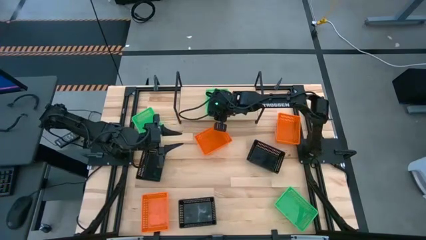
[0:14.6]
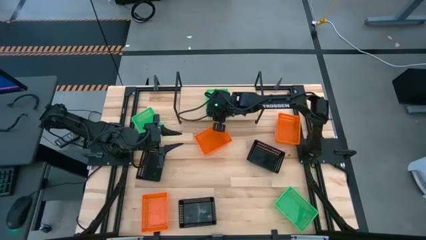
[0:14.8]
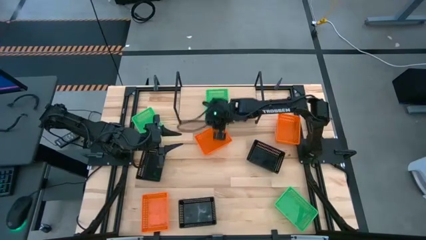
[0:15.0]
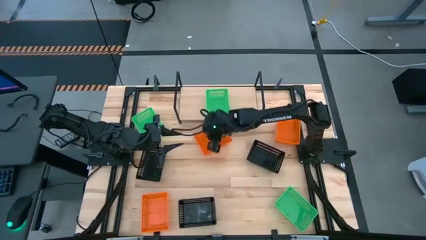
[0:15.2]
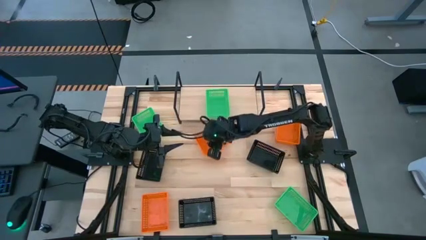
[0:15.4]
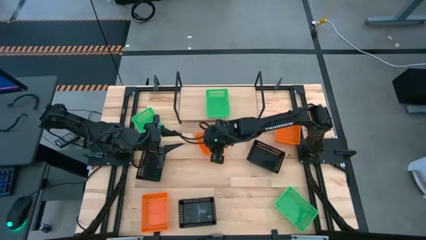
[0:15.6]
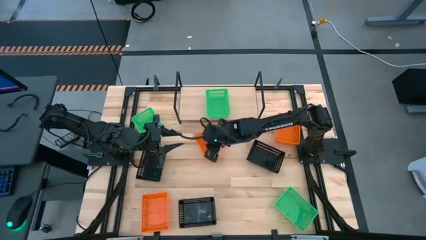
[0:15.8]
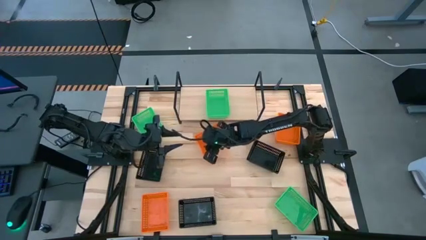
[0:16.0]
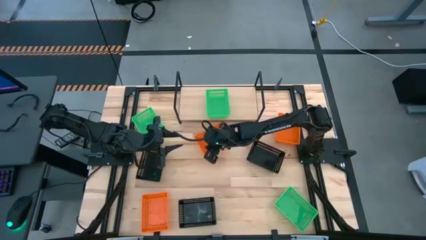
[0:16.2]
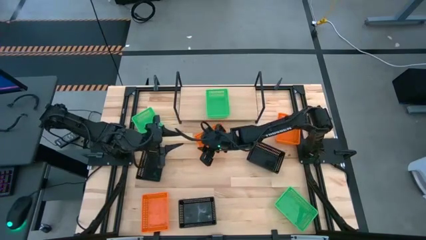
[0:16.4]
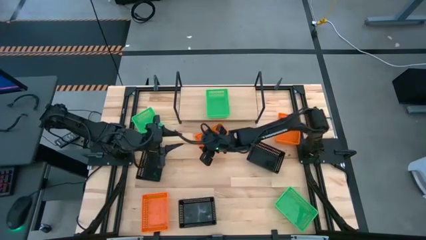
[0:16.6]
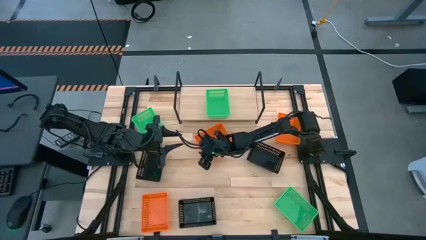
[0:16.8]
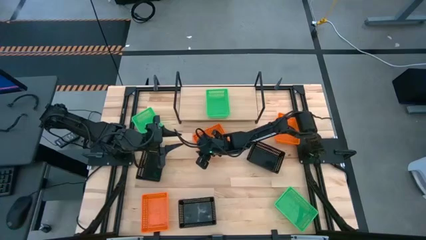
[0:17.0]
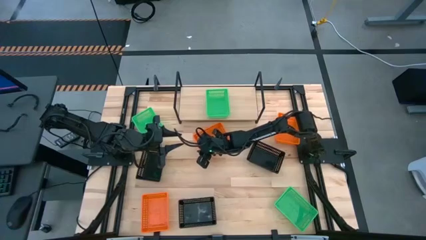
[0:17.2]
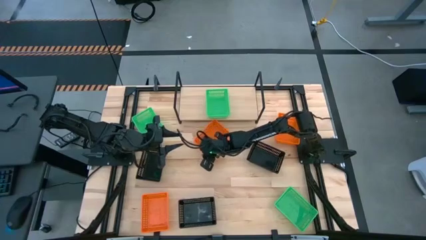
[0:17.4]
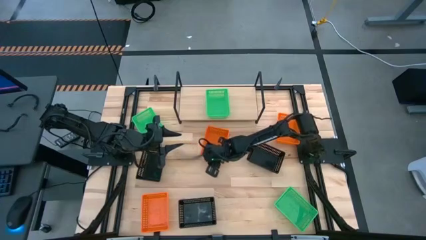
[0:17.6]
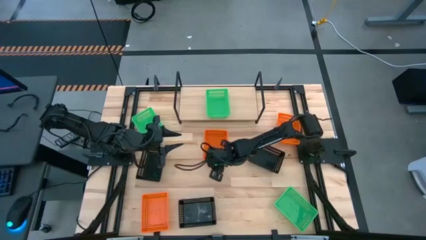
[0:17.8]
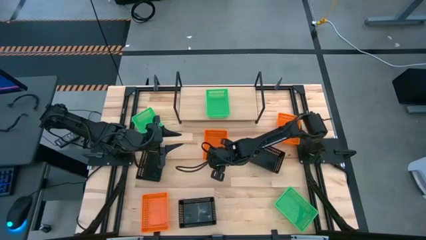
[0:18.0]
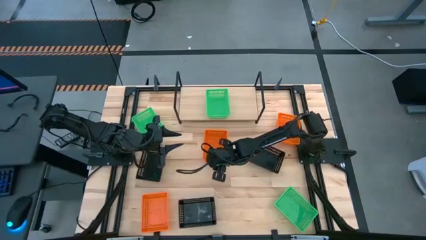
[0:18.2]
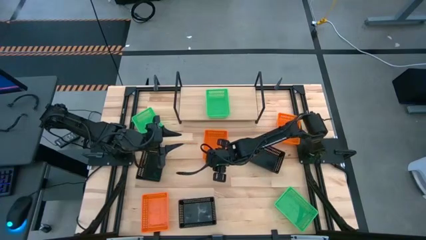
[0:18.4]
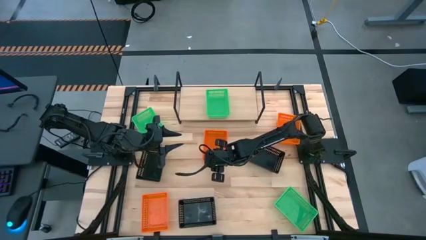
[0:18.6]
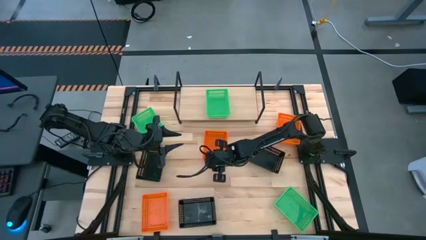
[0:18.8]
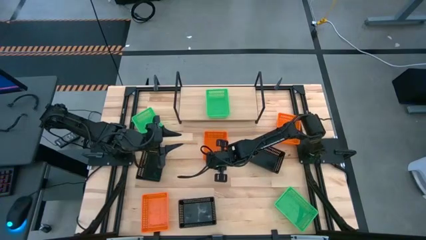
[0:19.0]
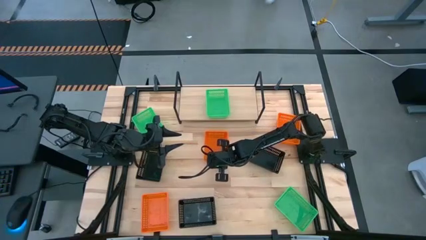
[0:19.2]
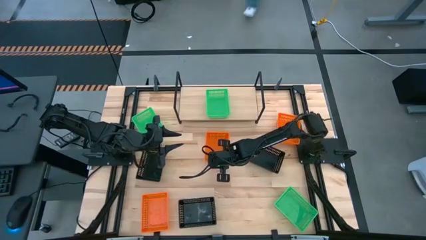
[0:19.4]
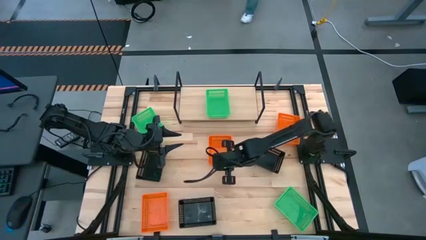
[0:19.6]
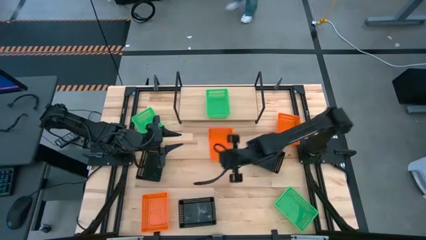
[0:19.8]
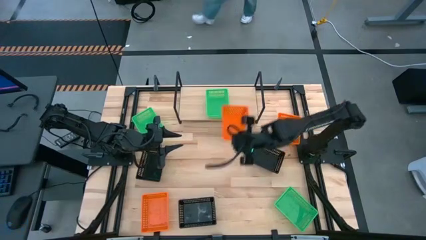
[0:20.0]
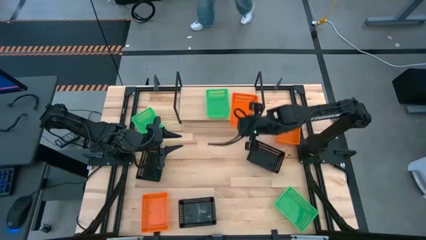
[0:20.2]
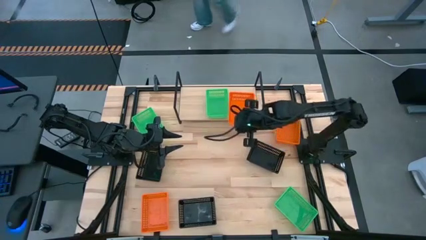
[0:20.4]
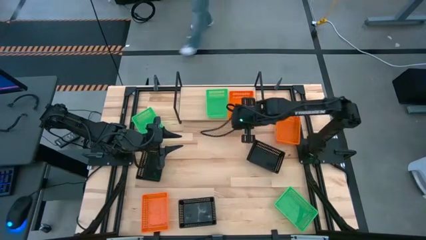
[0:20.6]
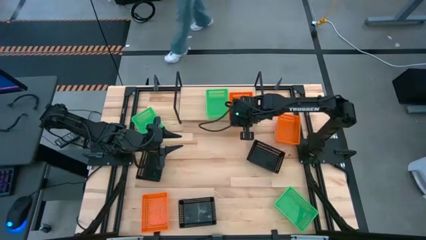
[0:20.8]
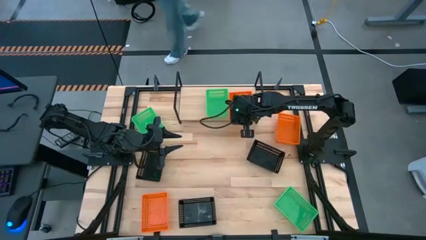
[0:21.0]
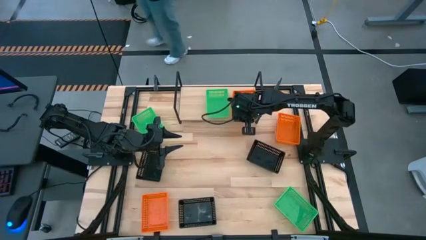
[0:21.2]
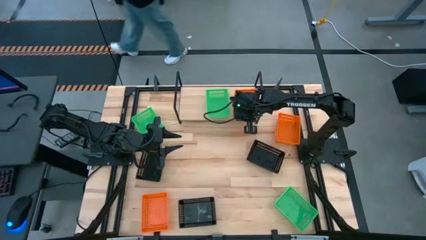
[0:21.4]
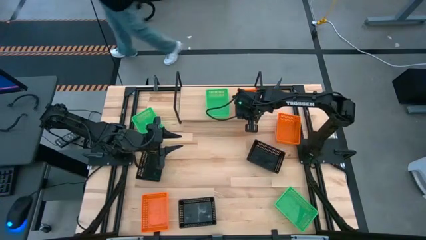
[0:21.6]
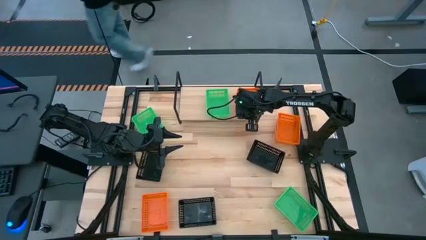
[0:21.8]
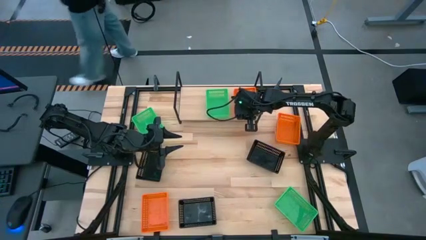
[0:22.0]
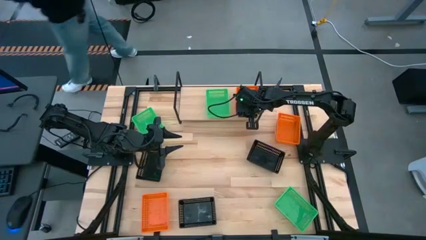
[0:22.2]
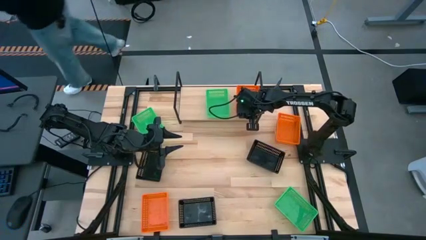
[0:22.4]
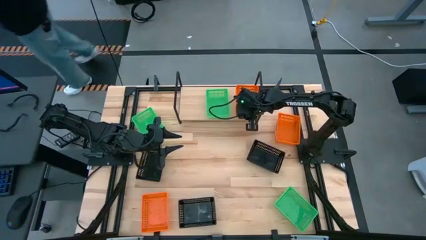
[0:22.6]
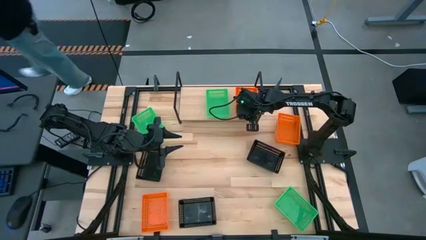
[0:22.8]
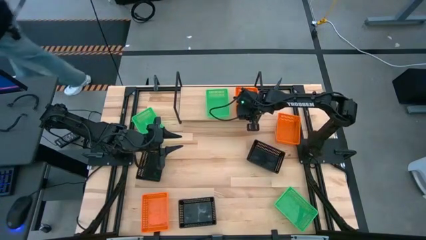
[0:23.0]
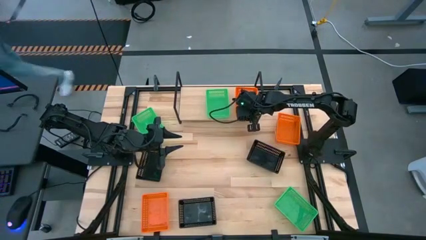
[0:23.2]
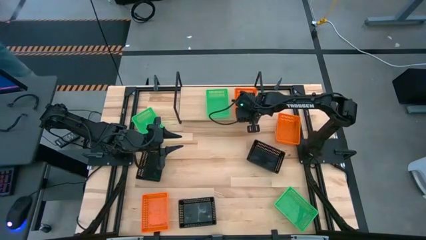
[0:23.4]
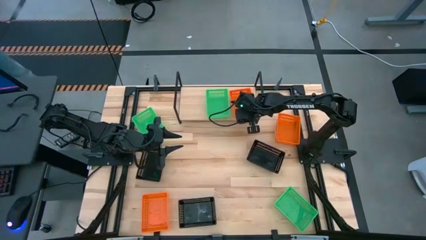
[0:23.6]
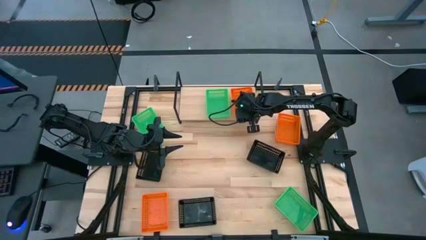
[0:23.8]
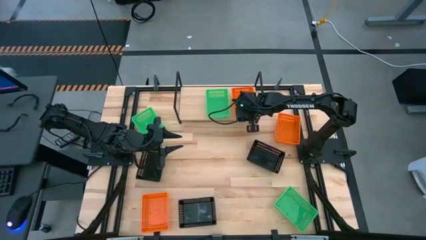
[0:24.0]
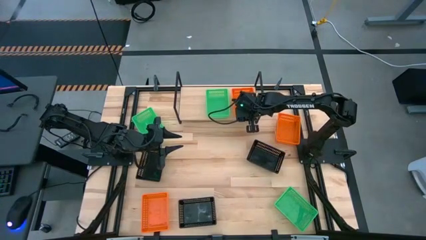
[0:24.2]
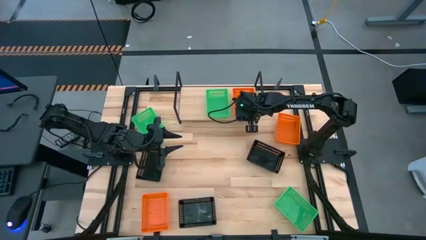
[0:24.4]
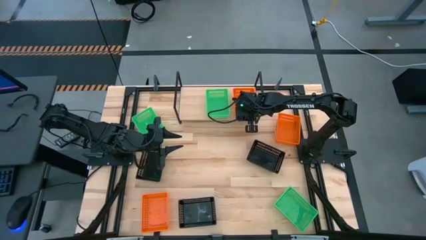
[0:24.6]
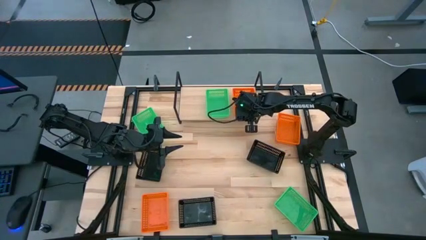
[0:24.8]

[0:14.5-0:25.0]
Task: Stack baskets on shelf by color
Put the top left orange bin on the shelf
